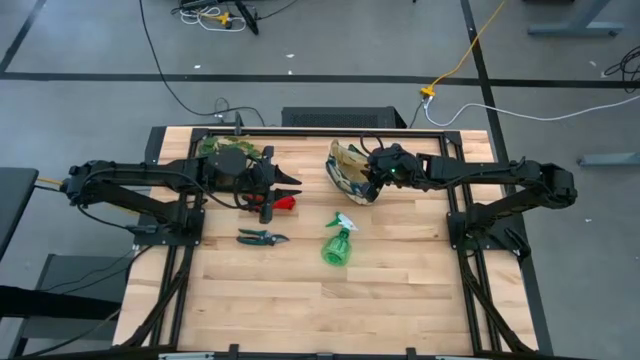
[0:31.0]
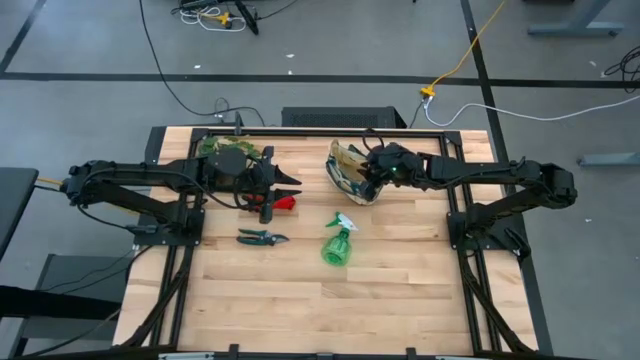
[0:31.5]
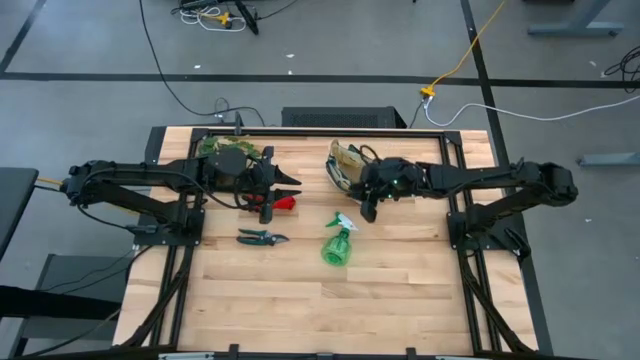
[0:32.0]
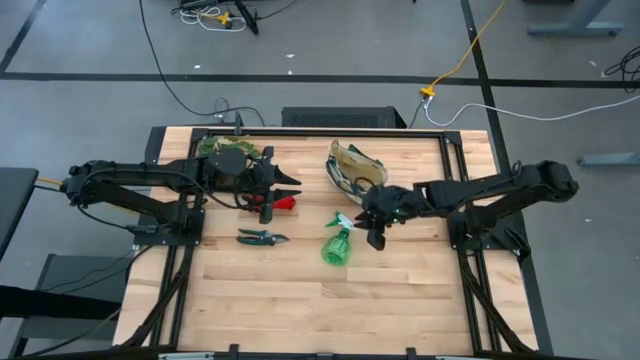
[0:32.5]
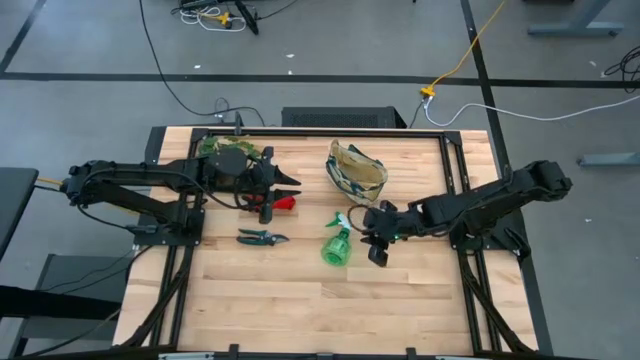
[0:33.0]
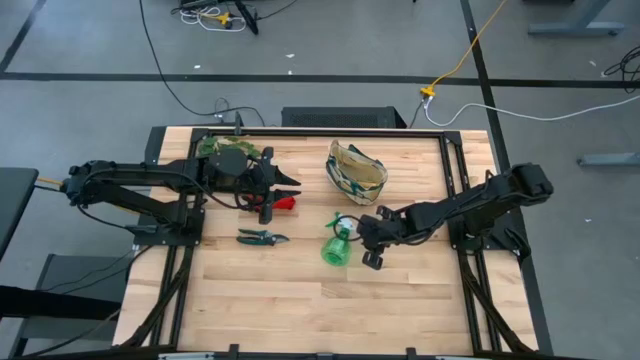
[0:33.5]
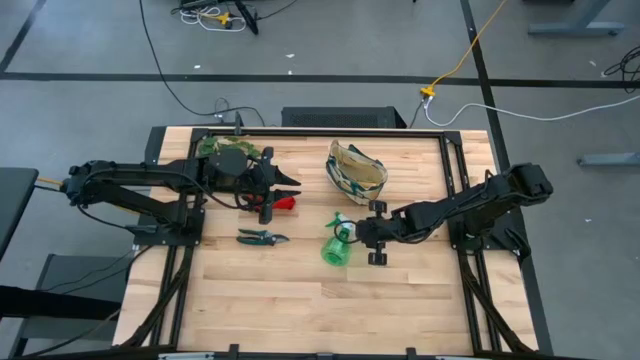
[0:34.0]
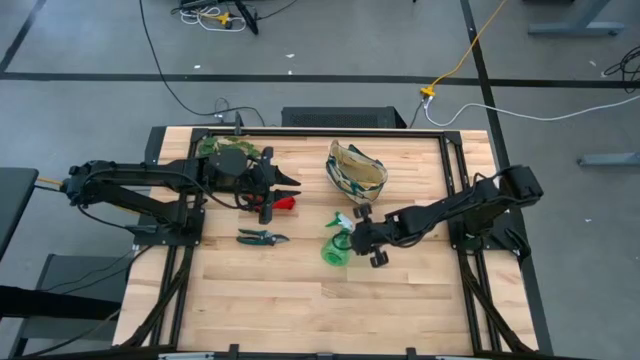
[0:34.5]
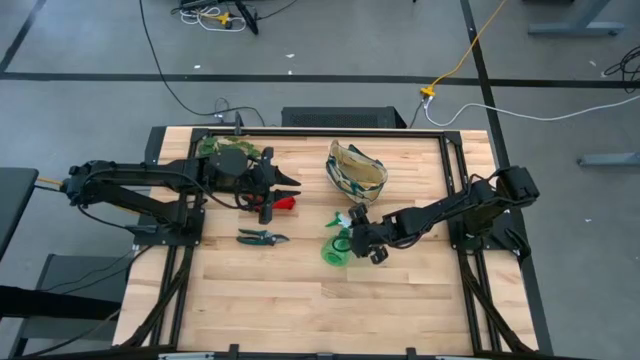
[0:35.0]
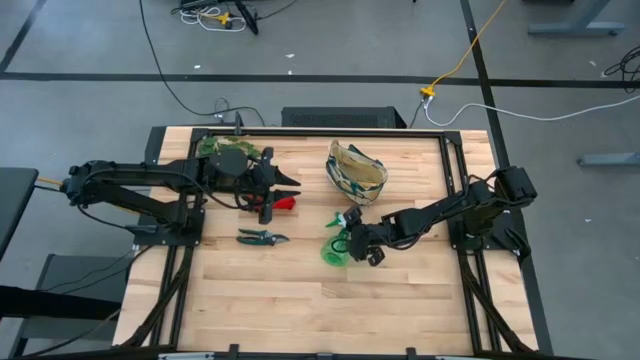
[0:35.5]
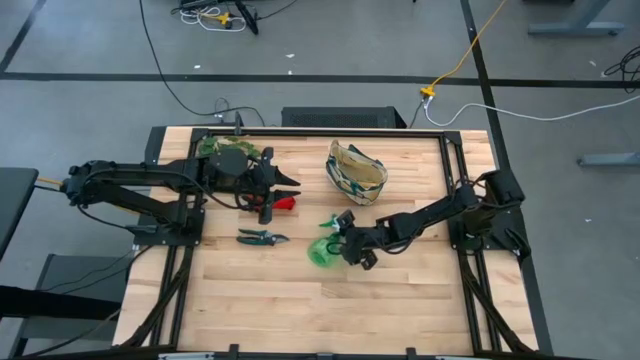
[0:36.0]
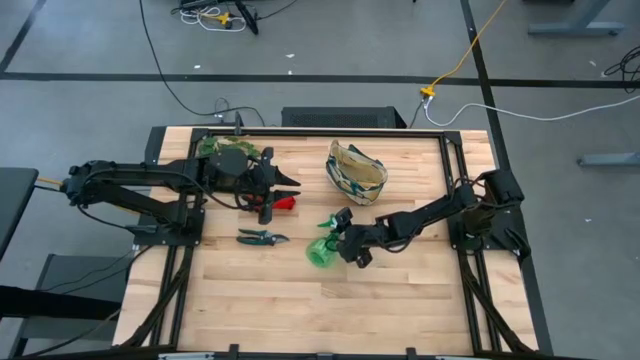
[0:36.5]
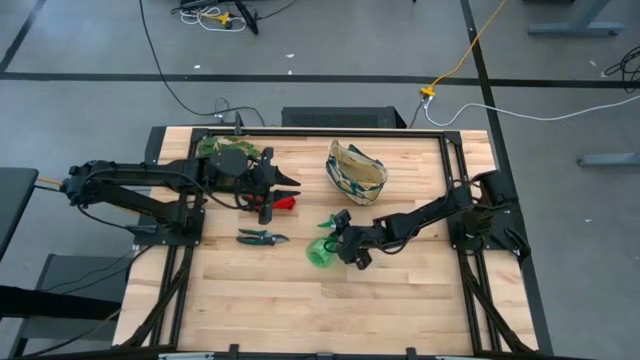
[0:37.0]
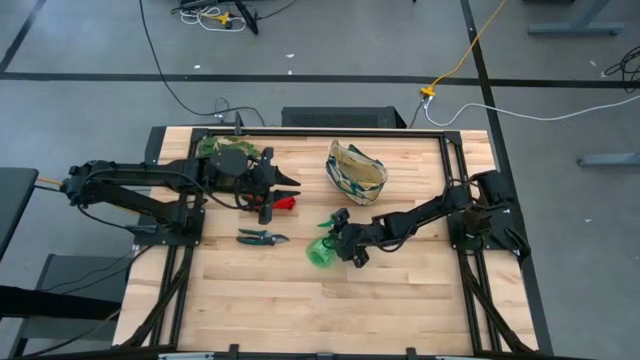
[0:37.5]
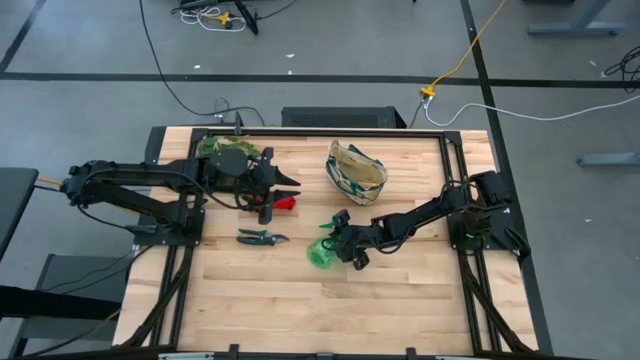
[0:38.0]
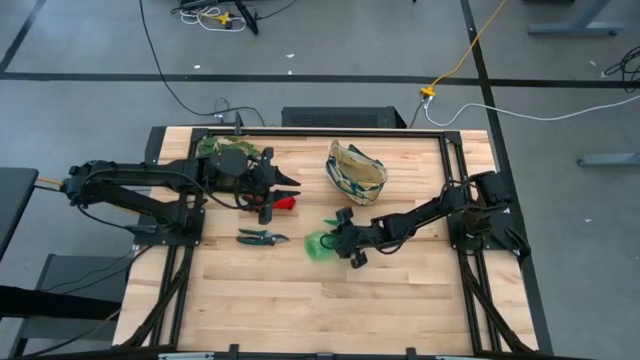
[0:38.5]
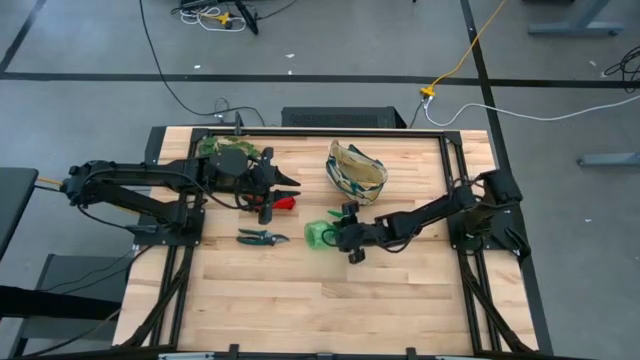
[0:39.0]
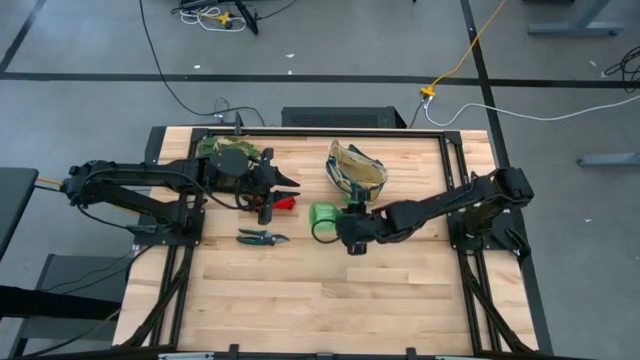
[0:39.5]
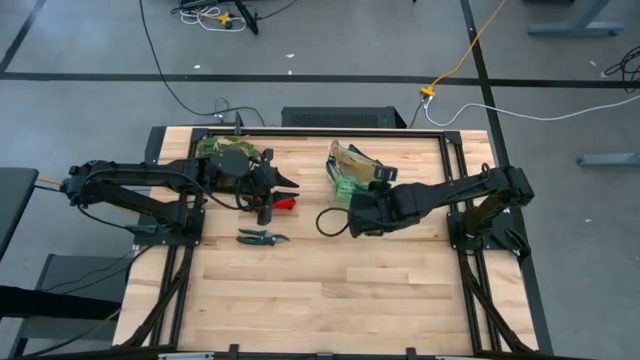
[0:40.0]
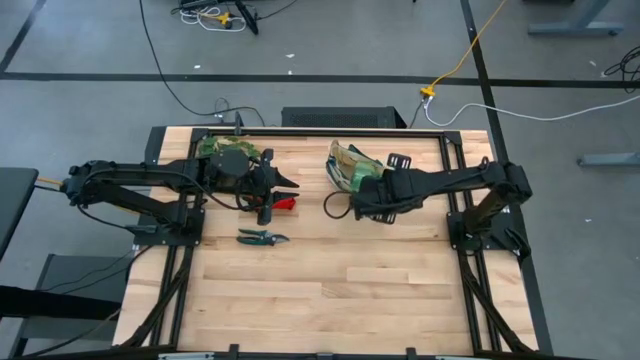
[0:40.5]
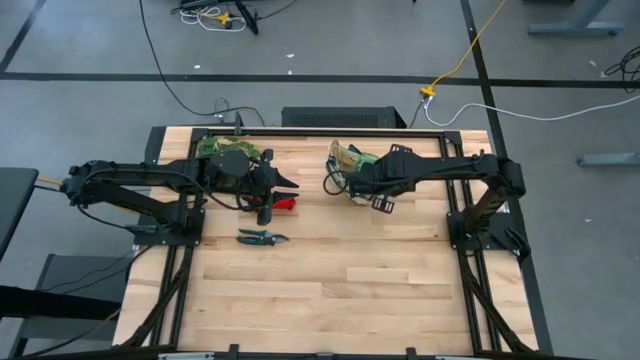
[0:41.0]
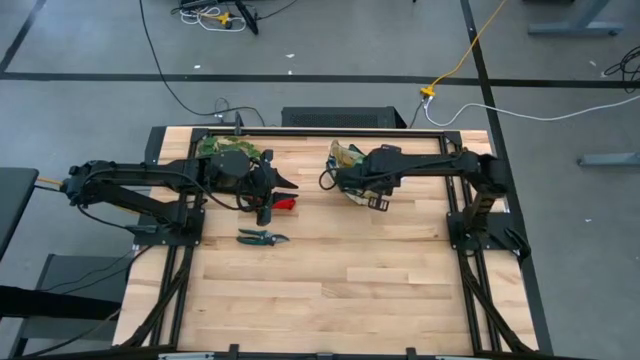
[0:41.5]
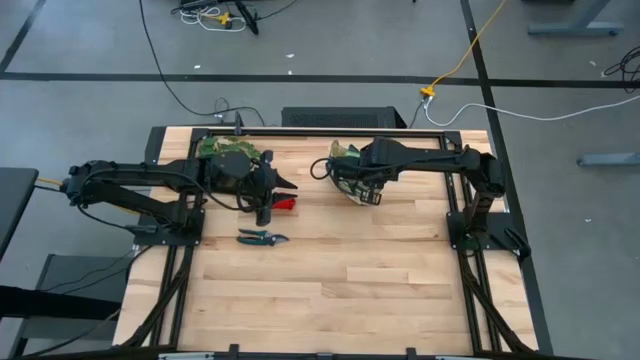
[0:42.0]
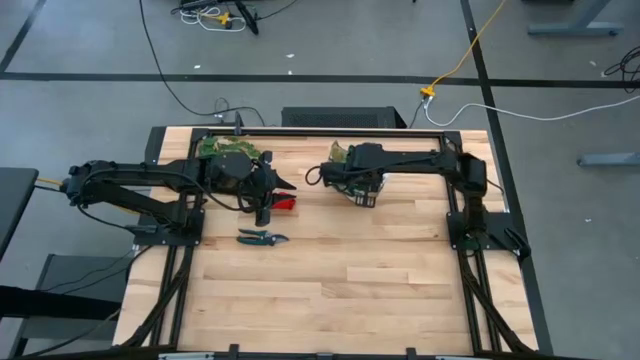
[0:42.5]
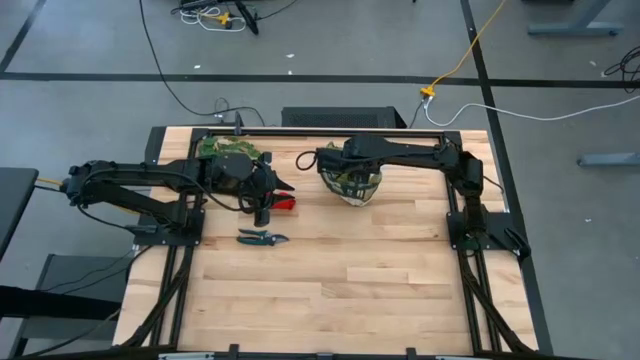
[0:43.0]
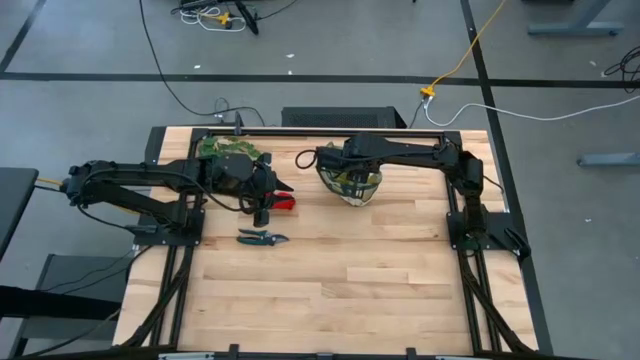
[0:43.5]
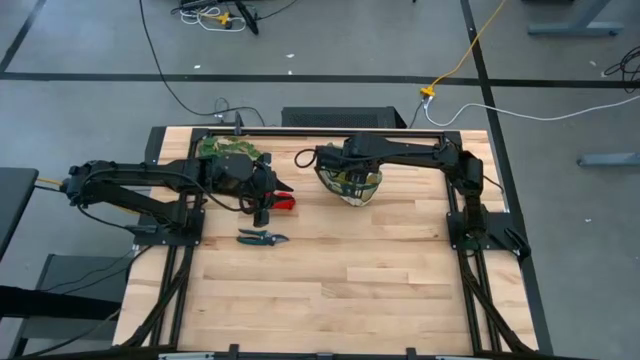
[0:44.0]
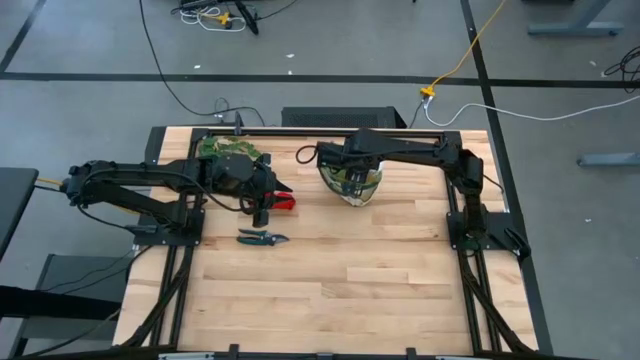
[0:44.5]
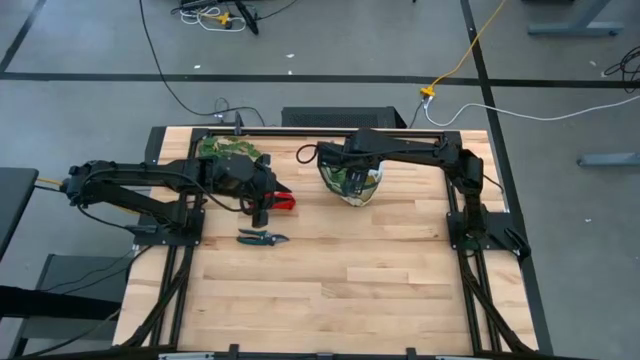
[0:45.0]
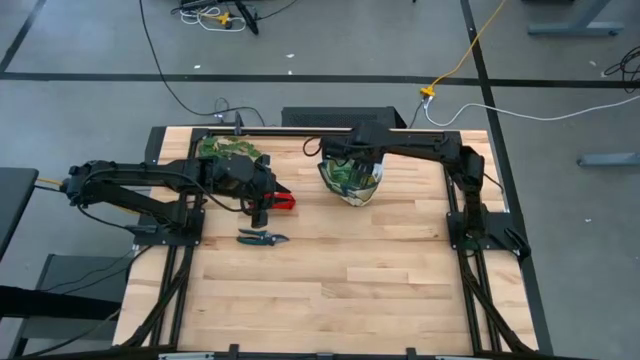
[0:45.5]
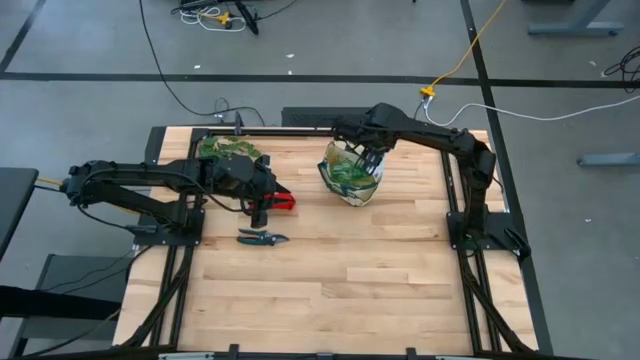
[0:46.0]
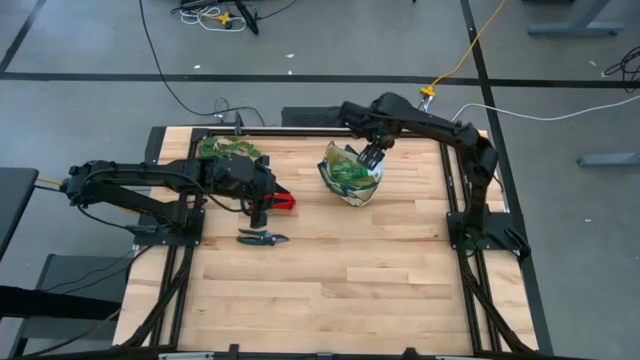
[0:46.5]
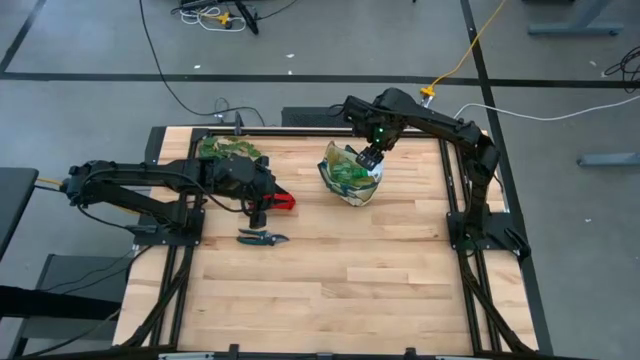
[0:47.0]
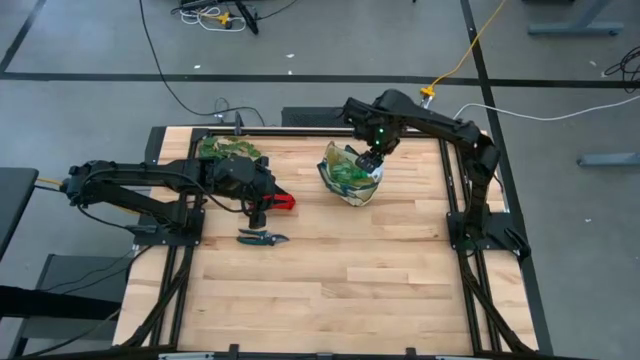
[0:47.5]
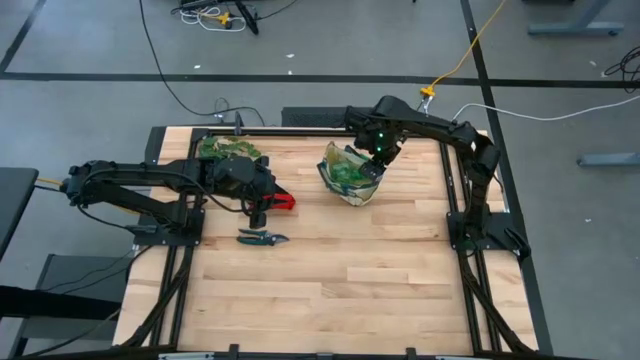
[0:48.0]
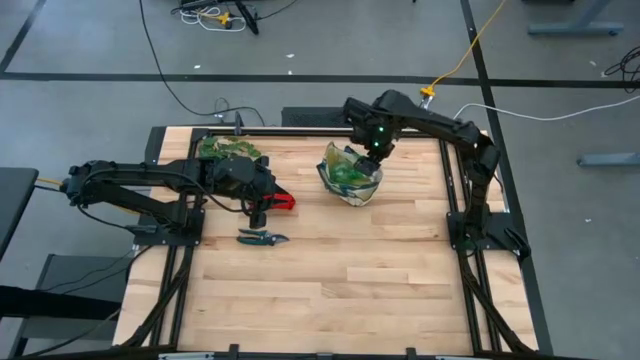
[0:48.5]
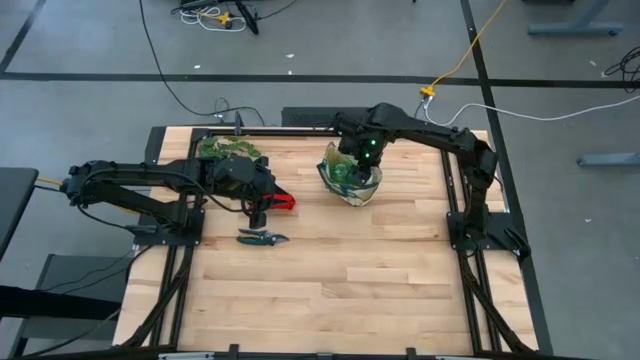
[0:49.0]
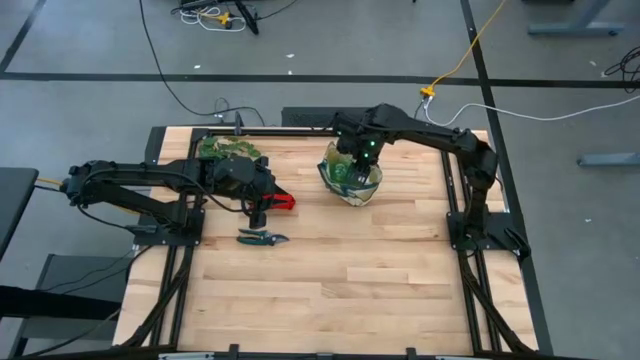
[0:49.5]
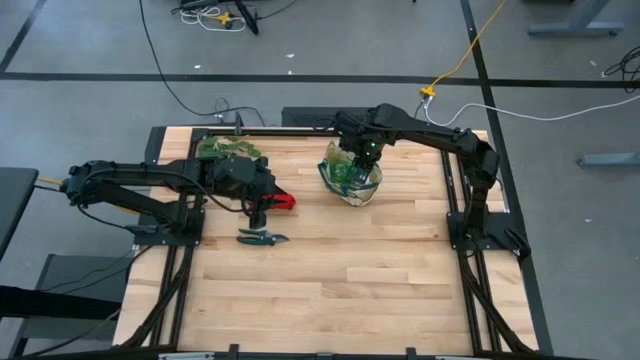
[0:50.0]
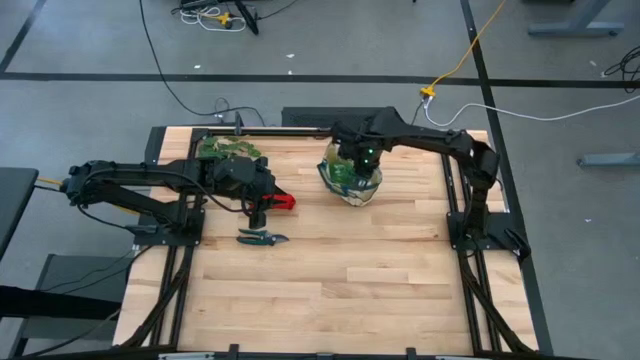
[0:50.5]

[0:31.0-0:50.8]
Task: Pick & Place Garden tools in Gardening bag
Put the green spray bottle into the patterned white gardening bag

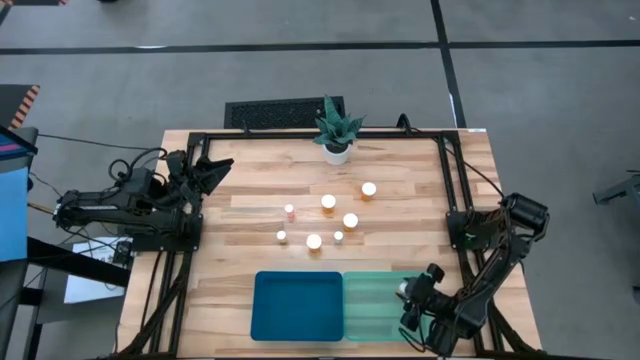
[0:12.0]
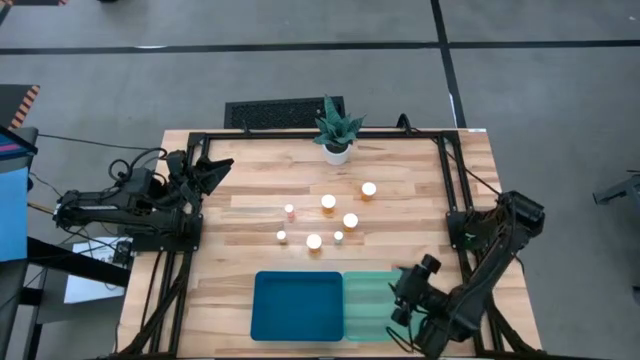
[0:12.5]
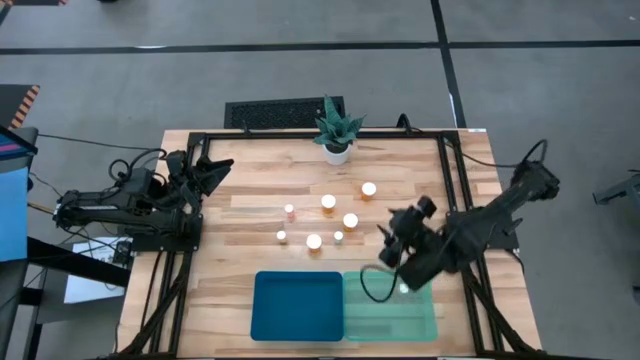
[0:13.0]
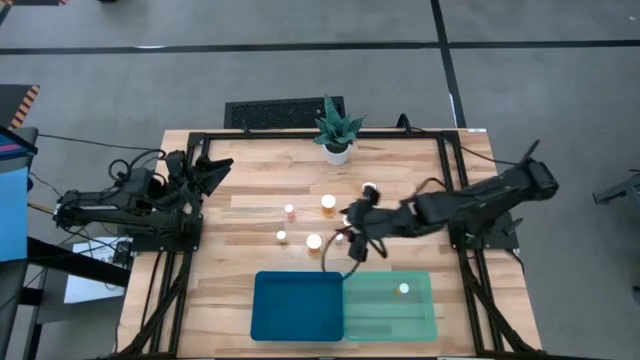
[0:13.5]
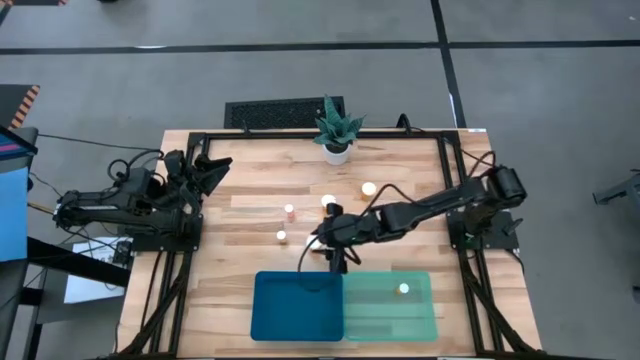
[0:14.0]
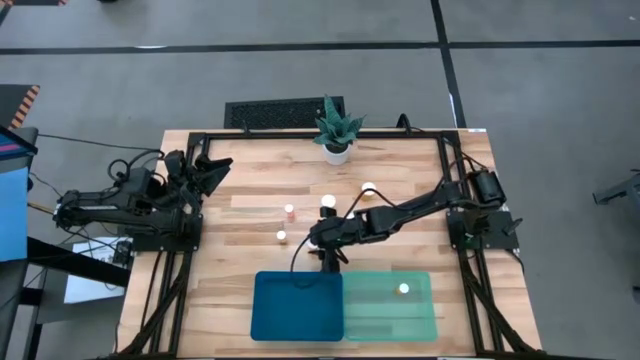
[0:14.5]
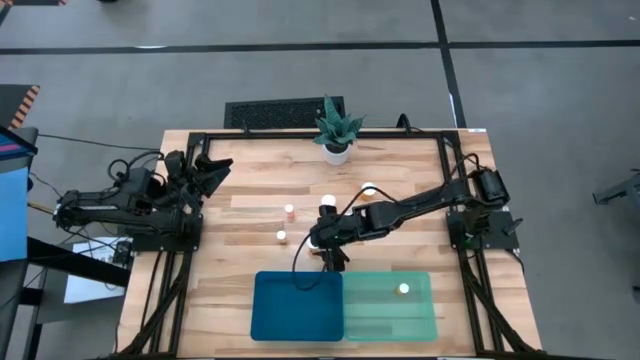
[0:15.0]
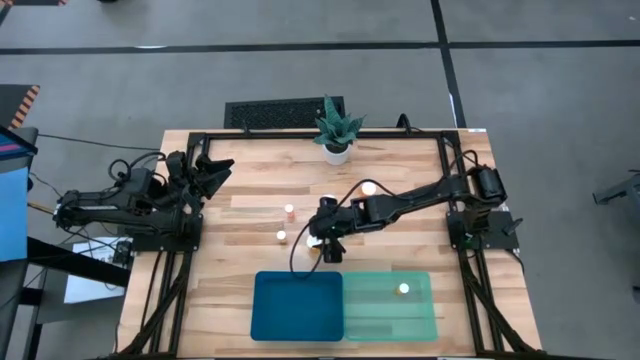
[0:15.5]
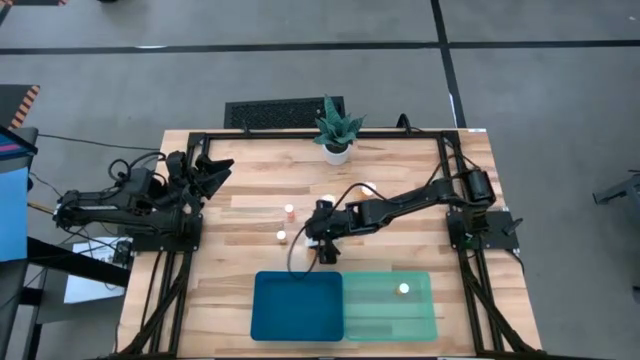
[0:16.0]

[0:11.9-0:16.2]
Task: Pick and place medicine bottles into bin by pill shape (circle, oval)
Put the large orange pill bottle into the blue bin
